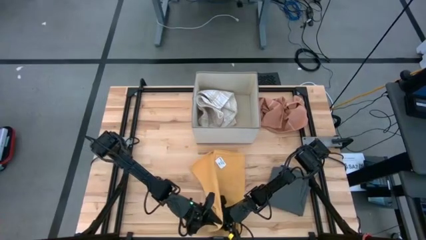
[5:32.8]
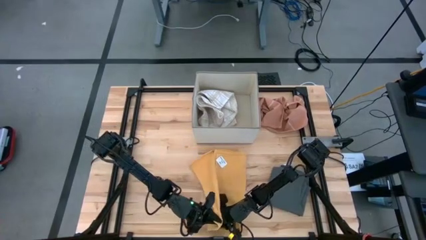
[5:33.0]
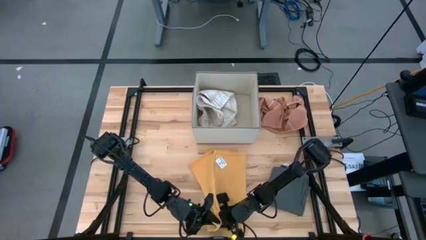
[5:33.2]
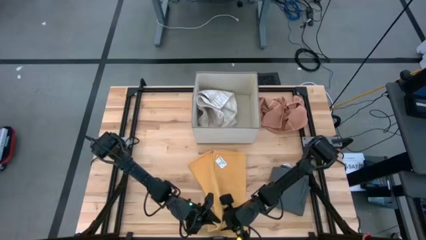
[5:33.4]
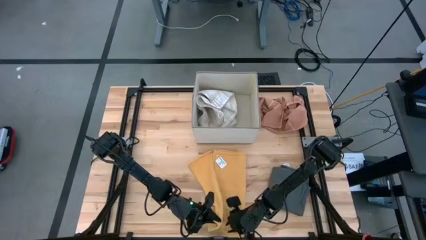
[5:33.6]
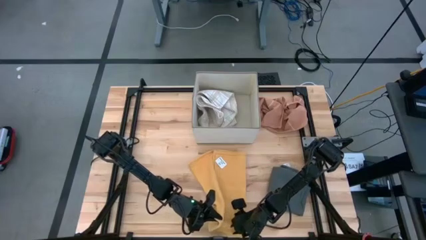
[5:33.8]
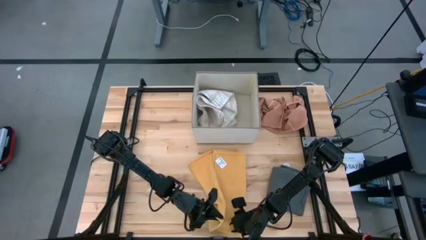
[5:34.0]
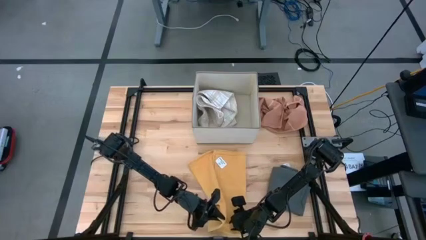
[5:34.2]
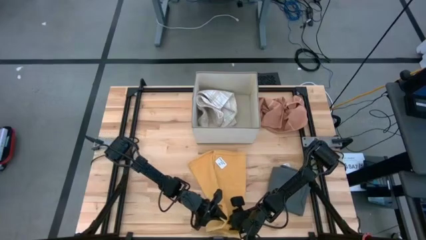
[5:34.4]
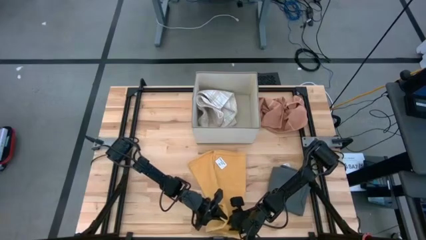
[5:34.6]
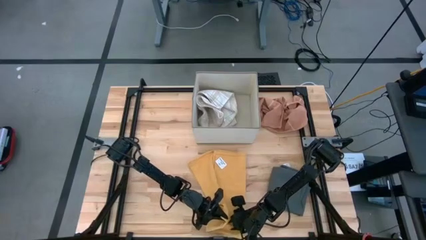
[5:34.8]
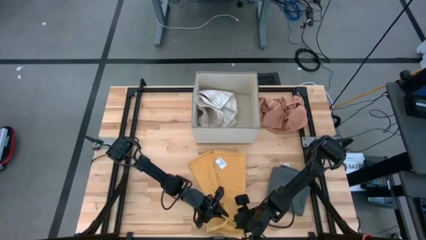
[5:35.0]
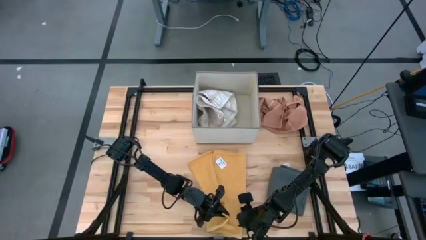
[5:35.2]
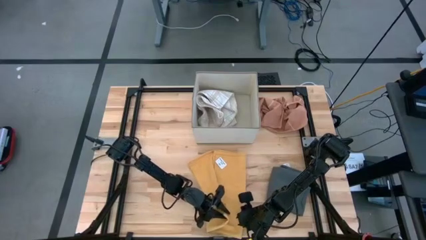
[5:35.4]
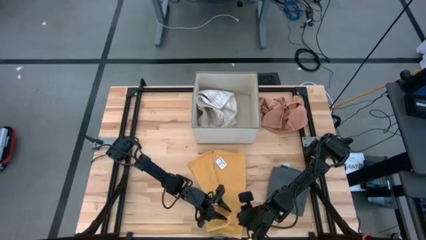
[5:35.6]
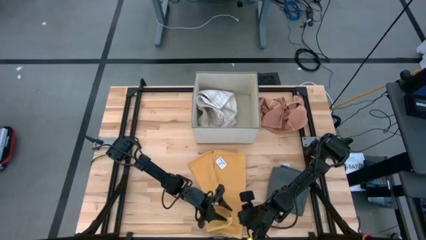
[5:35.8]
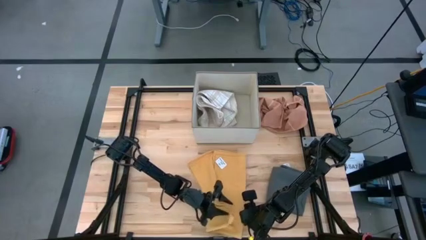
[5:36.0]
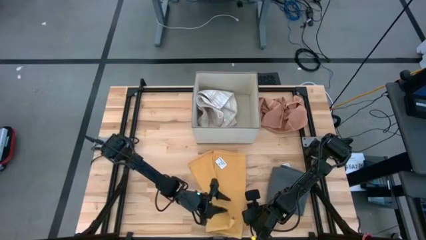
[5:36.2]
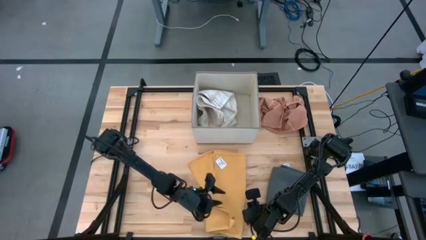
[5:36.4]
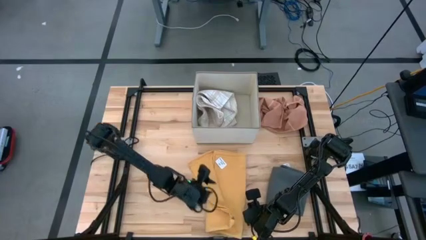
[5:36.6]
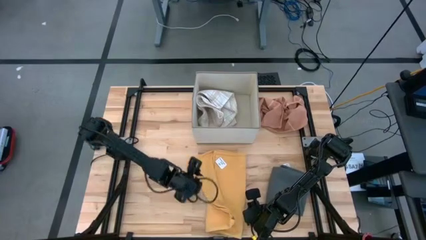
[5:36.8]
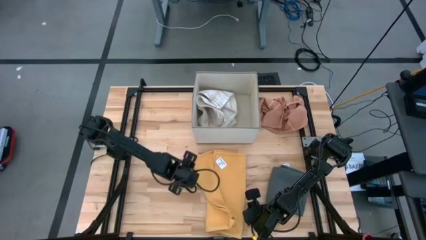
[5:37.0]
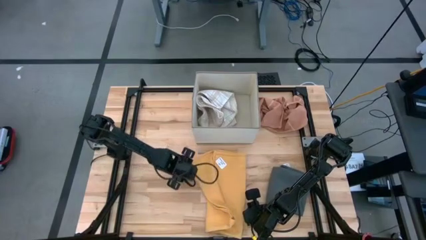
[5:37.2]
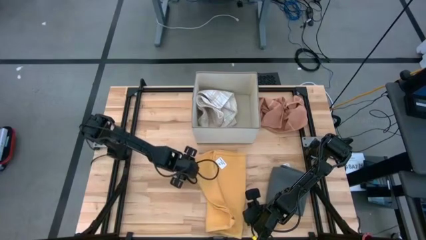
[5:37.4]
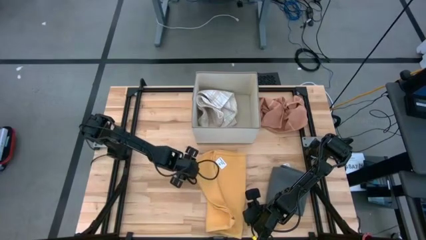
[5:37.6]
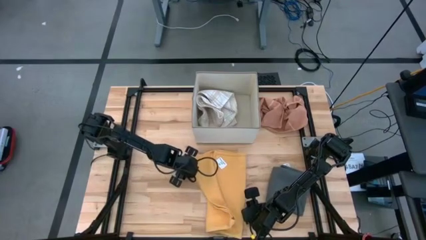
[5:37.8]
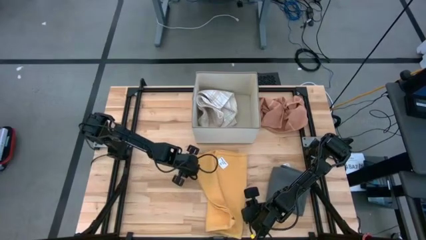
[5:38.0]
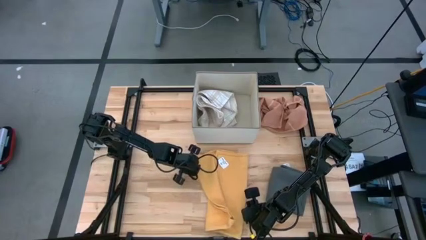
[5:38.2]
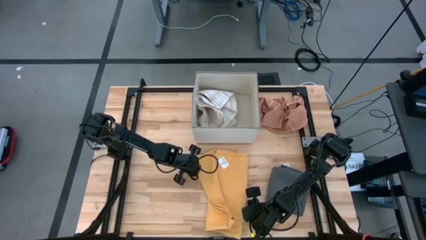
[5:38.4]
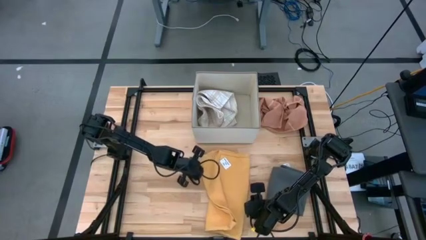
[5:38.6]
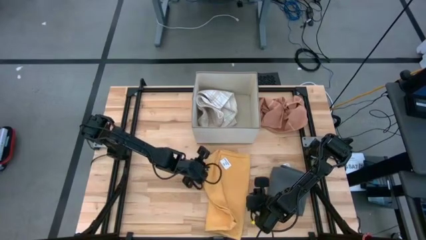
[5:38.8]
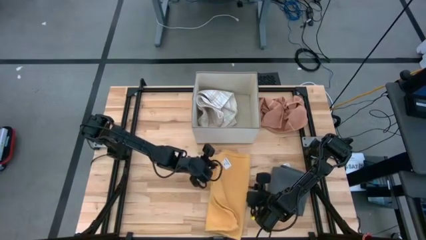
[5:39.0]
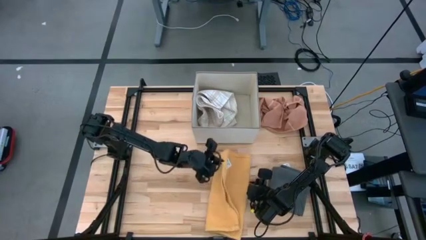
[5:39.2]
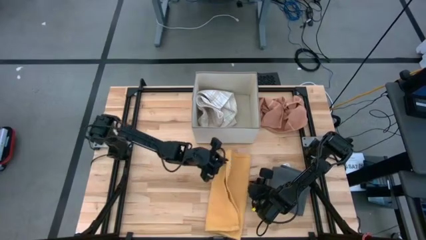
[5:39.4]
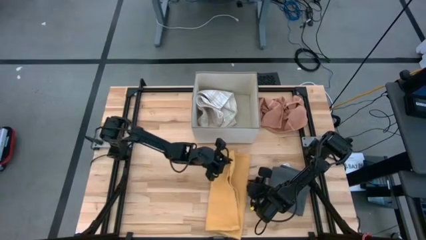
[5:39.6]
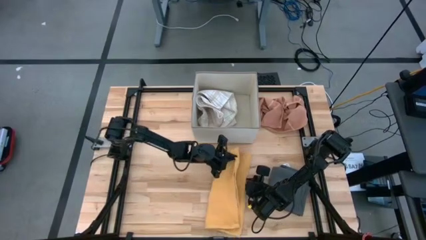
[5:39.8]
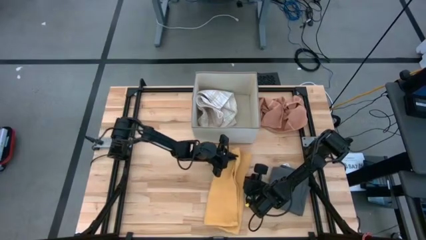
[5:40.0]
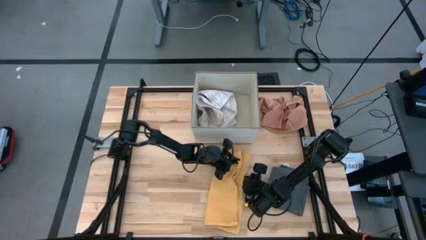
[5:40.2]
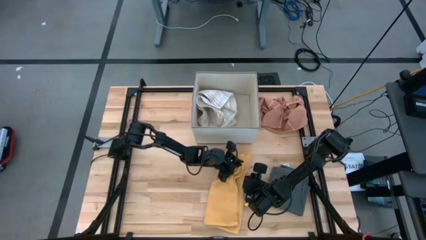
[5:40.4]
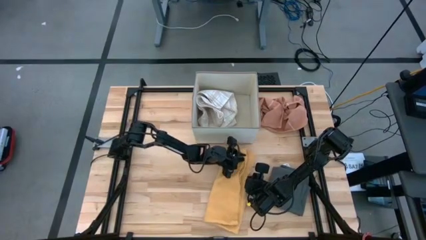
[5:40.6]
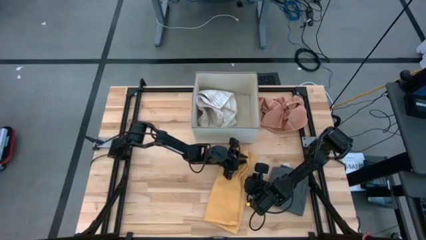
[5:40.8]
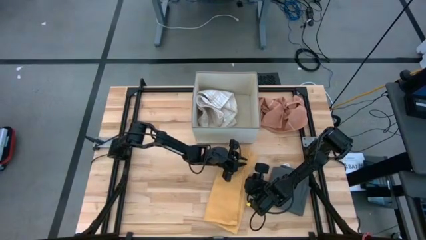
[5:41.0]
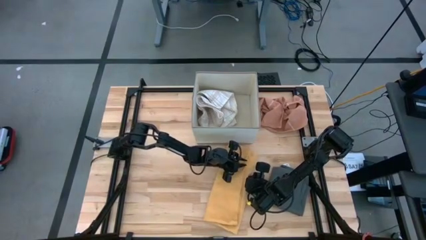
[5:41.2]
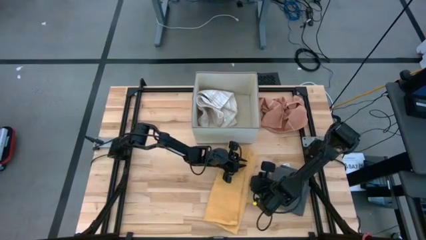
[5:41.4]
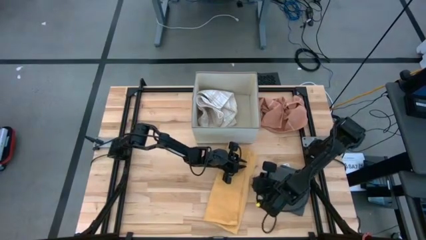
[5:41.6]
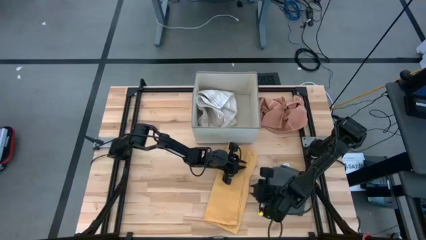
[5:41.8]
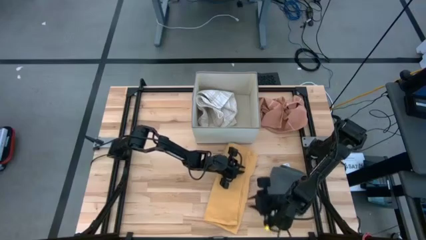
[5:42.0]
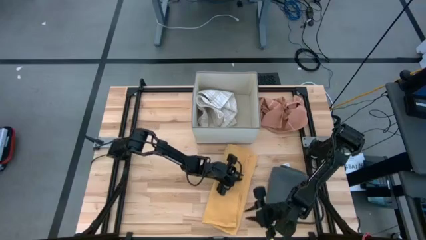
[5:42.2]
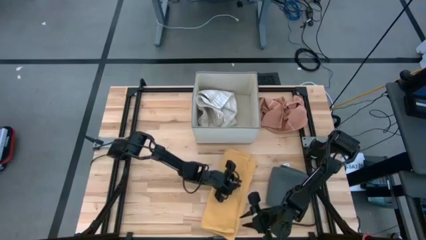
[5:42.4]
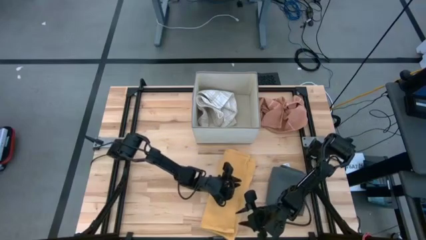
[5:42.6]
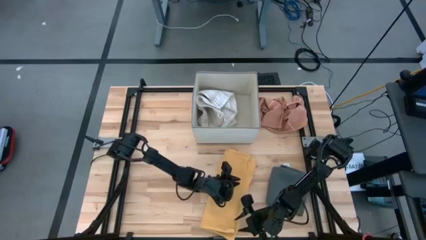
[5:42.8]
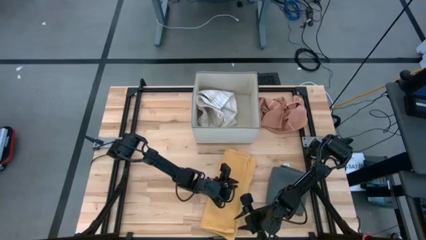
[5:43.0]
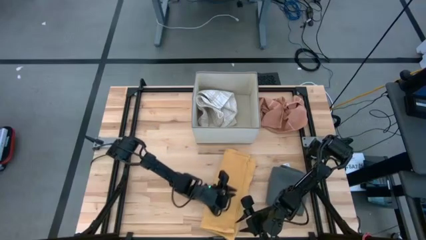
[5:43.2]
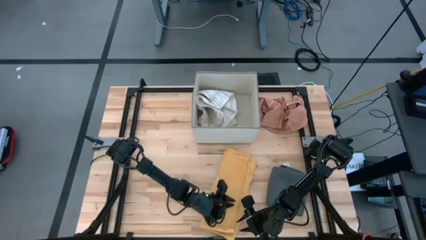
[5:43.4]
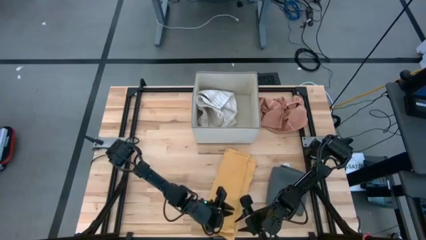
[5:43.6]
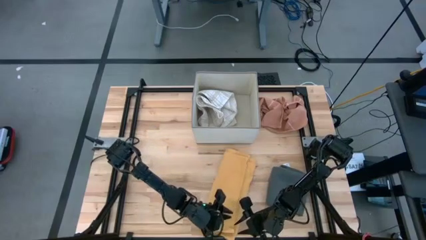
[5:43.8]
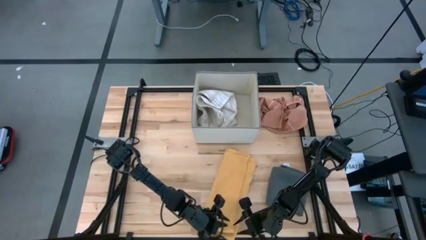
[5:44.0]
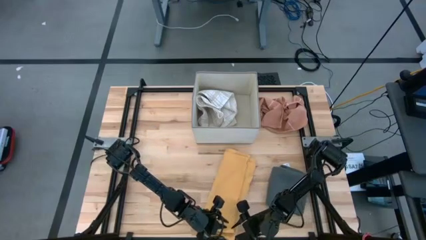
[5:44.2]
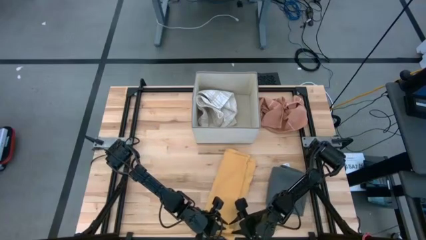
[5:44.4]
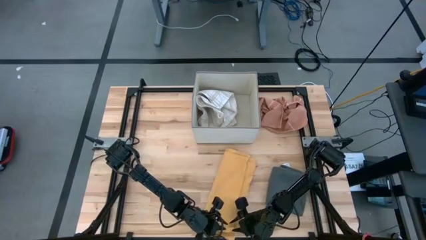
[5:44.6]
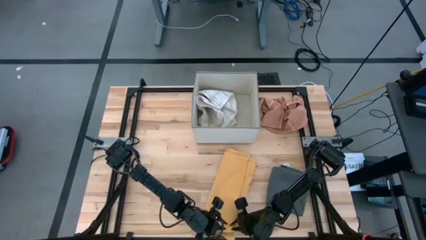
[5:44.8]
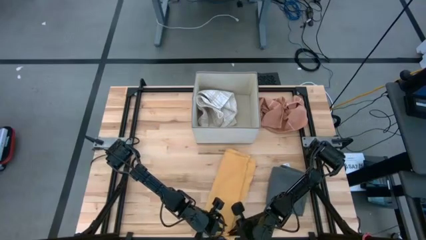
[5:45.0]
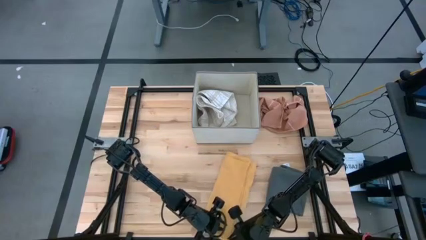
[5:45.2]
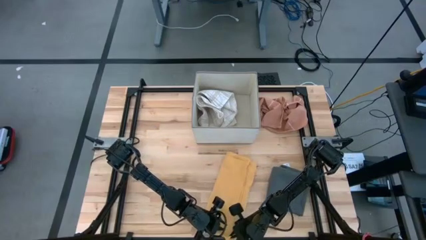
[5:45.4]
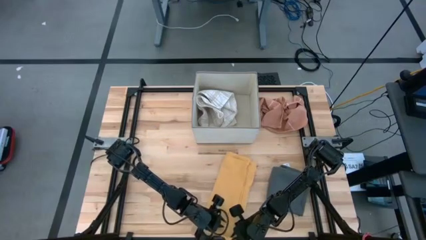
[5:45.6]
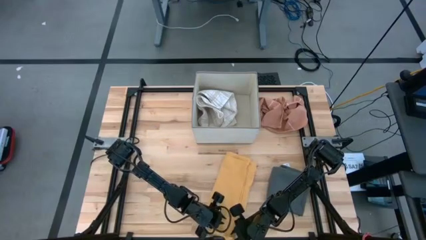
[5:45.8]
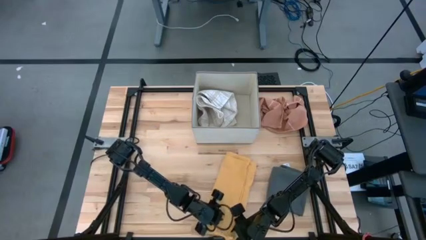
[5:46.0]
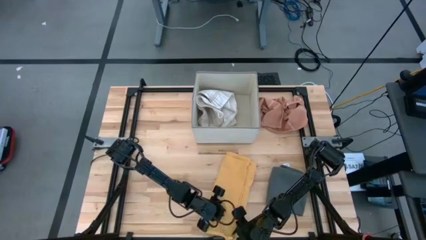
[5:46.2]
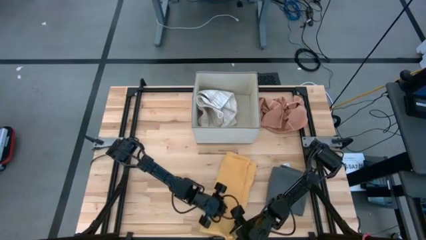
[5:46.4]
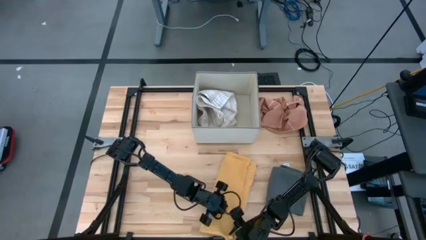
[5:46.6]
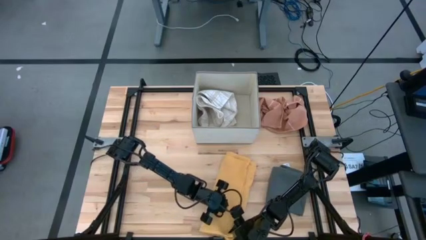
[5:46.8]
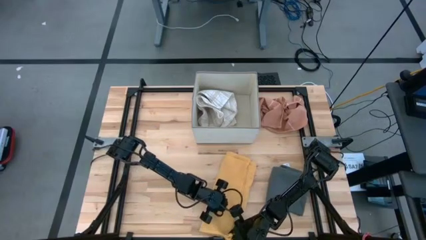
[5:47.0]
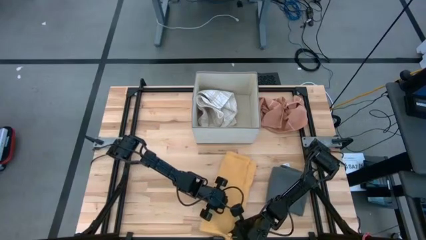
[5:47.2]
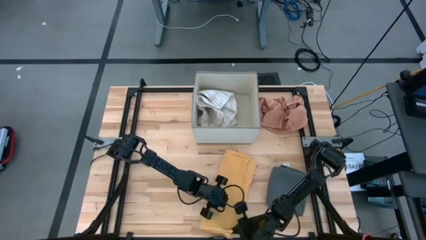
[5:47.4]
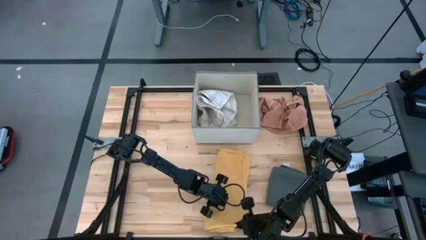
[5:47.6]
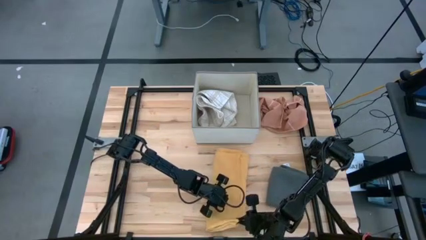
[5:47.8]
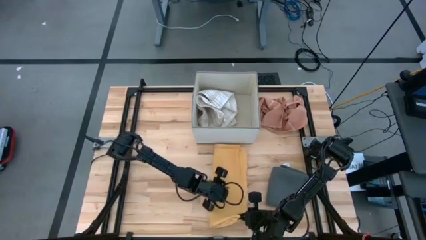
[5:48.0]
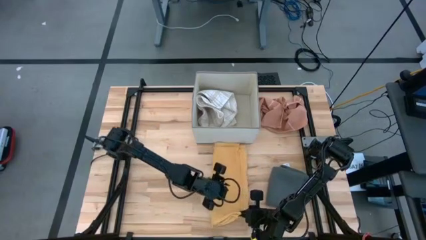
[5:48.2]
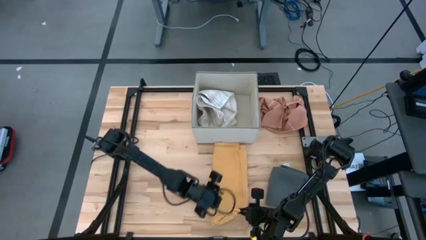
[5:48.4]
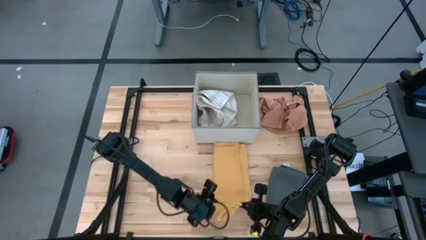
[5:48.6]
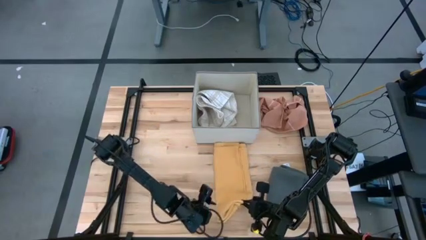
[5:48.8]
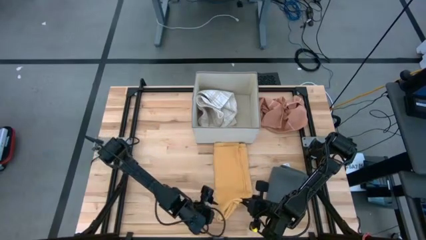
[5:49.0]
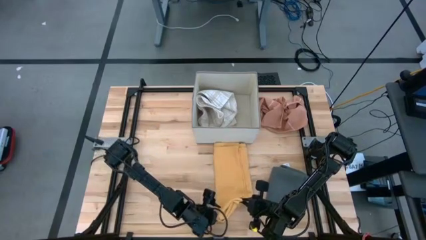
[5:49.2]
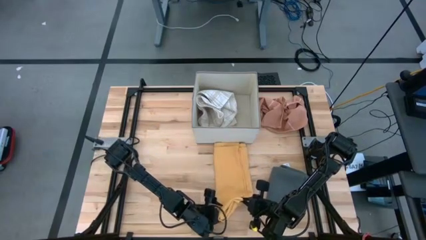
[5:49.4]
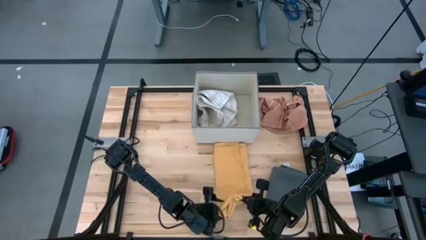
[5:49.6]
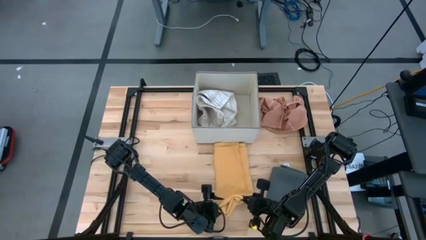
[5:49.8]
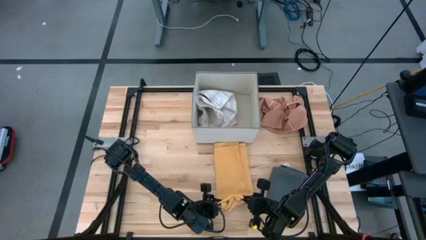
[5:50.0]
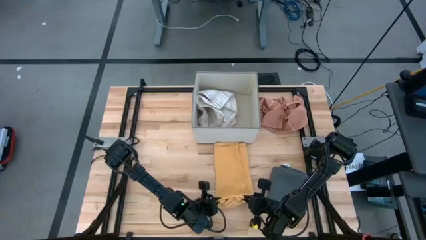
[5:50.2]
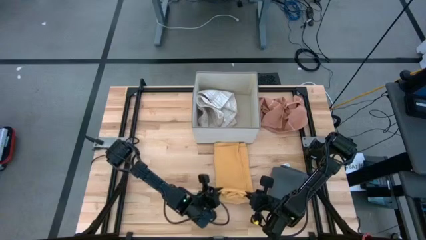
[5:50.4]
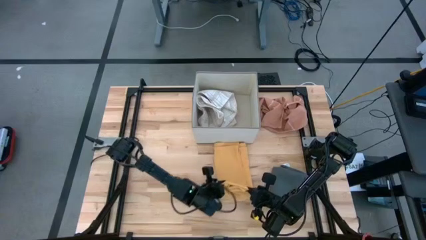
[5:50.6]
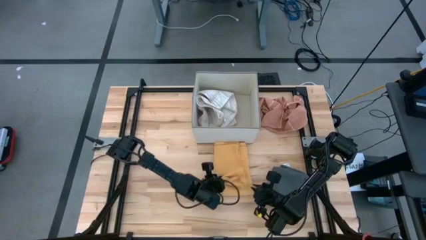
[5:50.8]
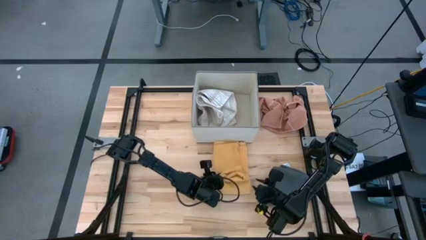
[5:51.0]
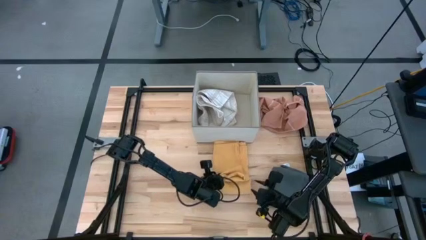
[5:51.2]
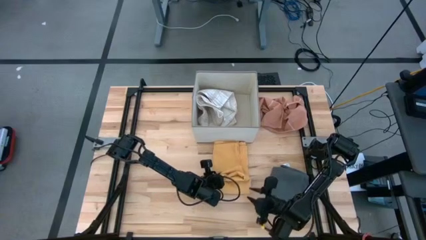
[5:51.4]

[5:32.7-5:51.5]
Task: Fold towel
Fold the yellow towel
